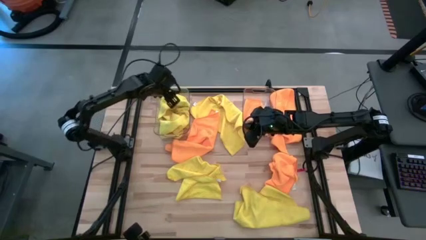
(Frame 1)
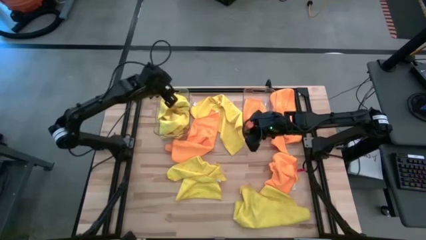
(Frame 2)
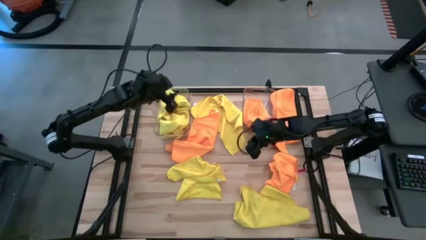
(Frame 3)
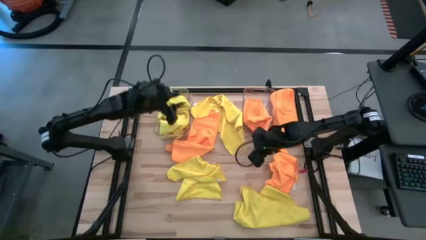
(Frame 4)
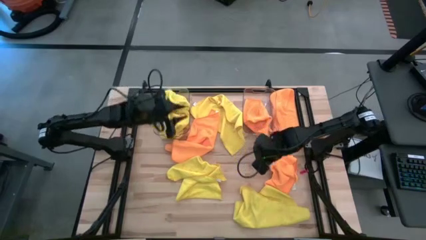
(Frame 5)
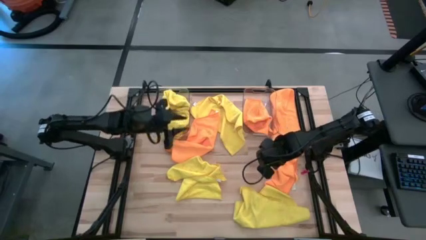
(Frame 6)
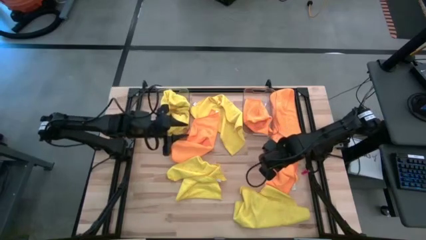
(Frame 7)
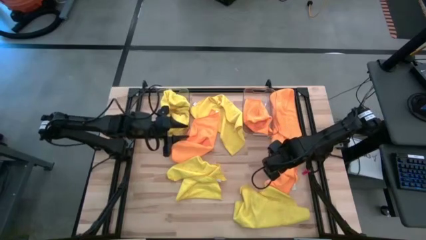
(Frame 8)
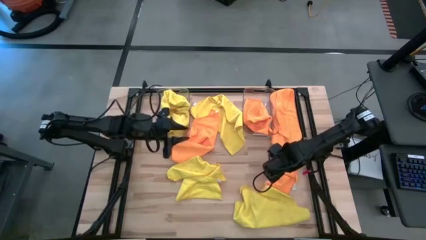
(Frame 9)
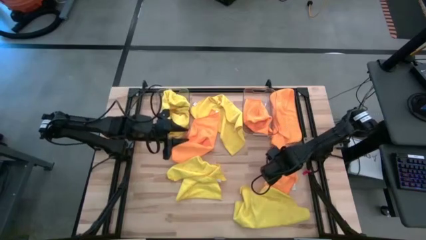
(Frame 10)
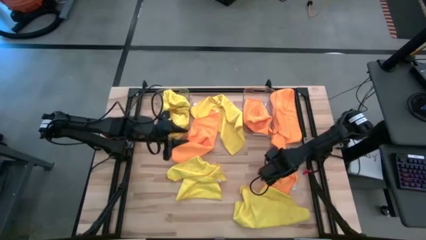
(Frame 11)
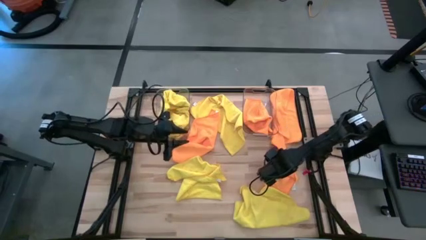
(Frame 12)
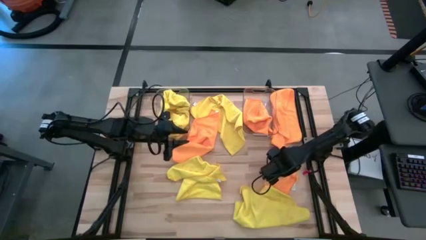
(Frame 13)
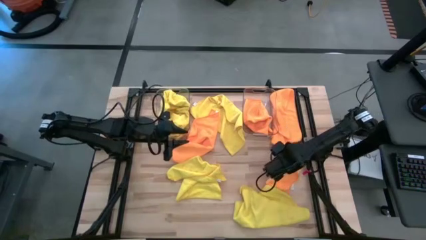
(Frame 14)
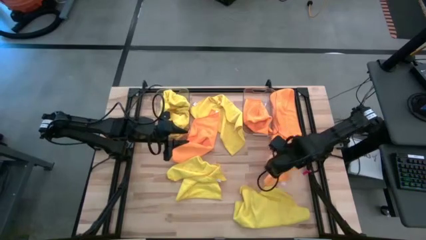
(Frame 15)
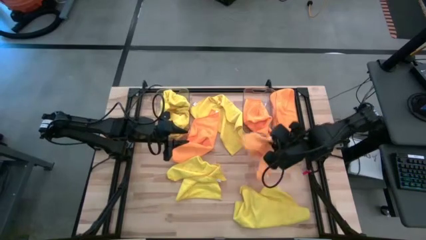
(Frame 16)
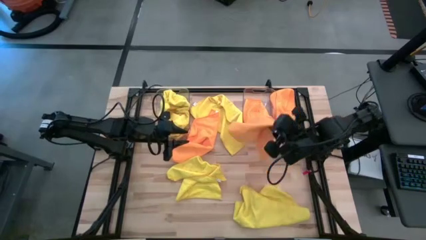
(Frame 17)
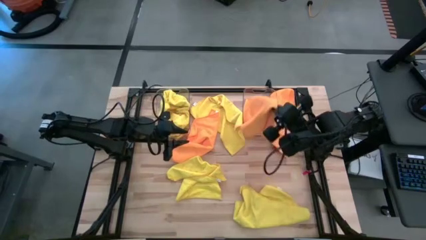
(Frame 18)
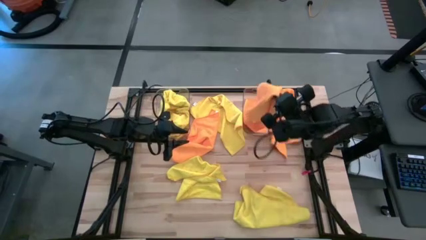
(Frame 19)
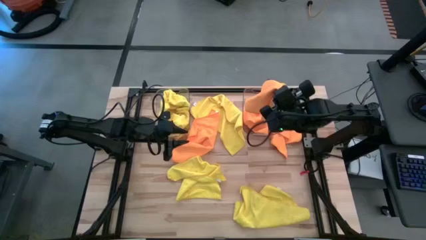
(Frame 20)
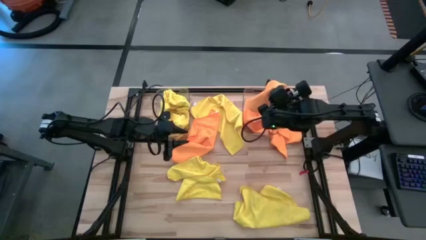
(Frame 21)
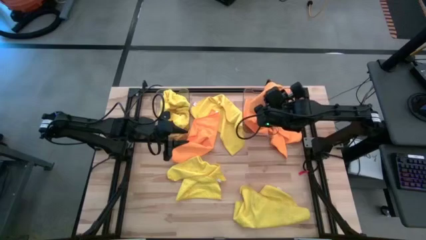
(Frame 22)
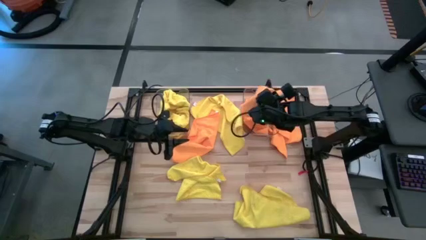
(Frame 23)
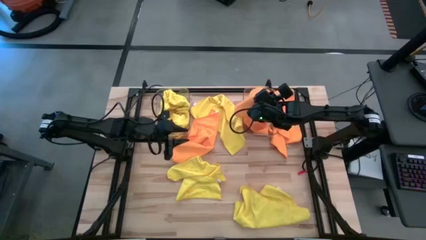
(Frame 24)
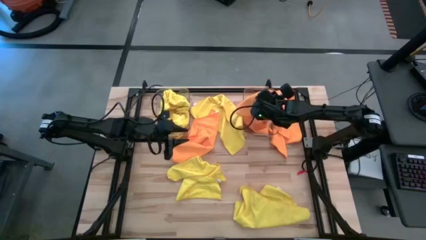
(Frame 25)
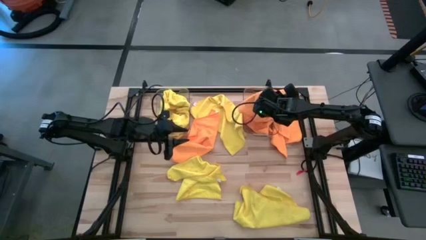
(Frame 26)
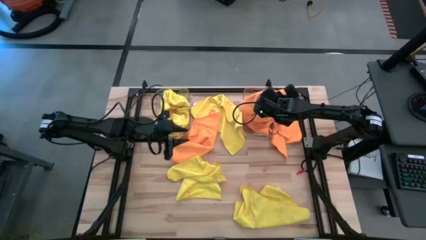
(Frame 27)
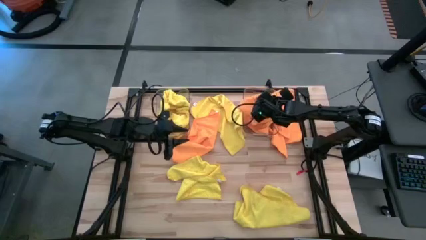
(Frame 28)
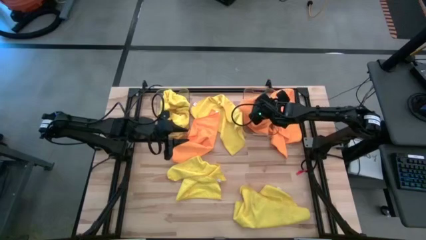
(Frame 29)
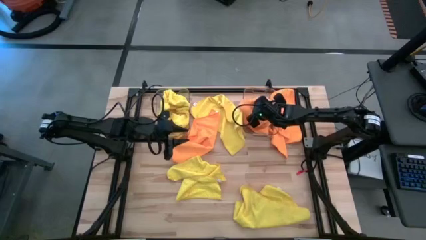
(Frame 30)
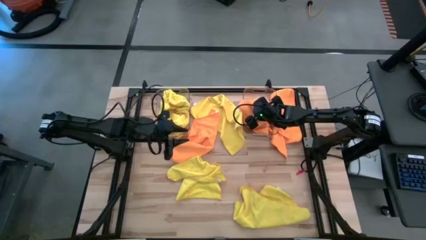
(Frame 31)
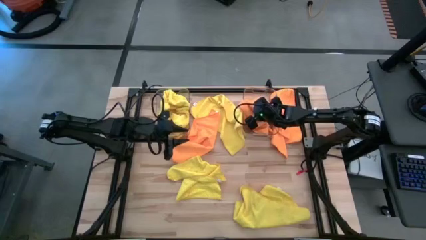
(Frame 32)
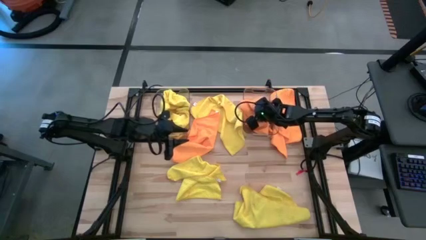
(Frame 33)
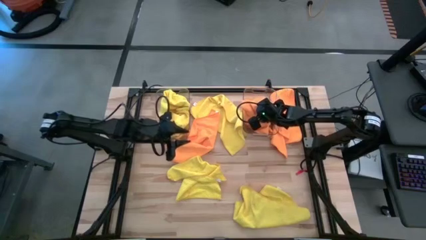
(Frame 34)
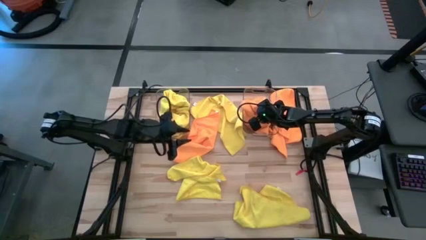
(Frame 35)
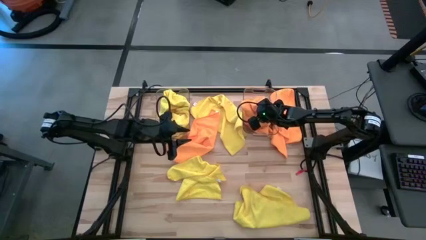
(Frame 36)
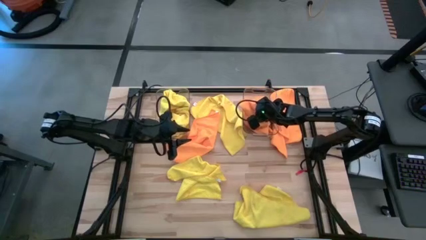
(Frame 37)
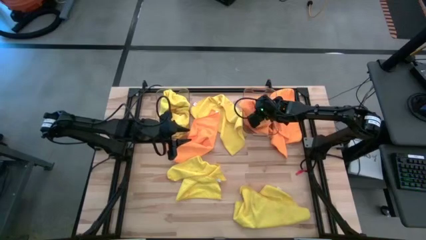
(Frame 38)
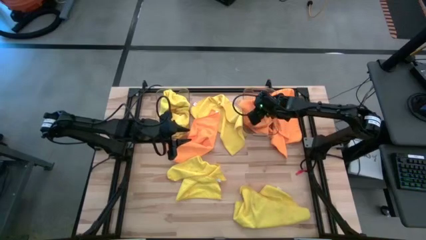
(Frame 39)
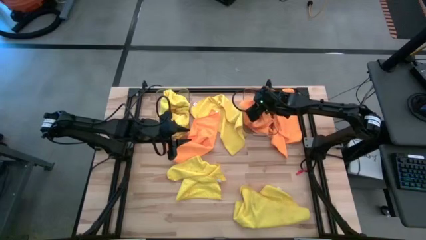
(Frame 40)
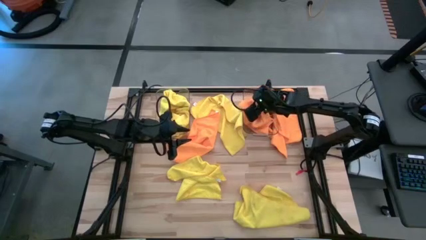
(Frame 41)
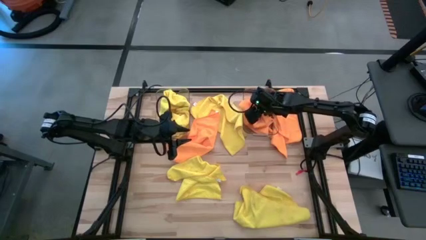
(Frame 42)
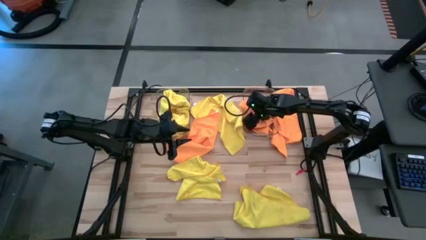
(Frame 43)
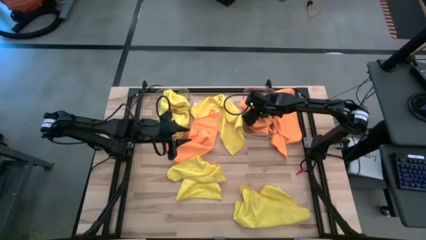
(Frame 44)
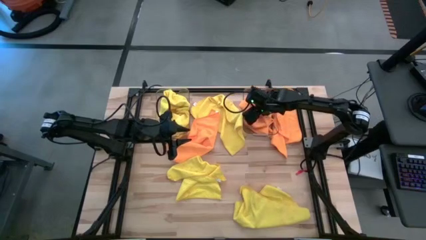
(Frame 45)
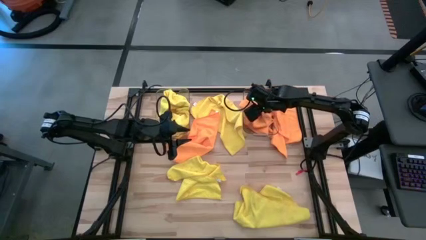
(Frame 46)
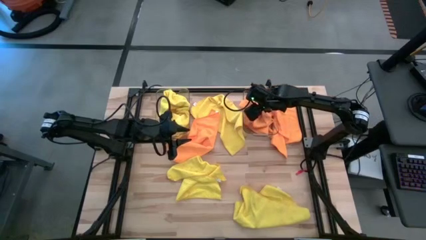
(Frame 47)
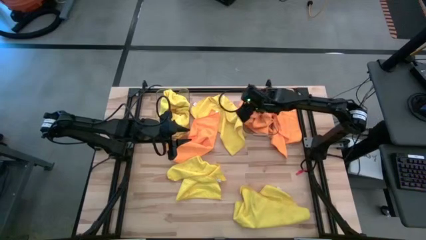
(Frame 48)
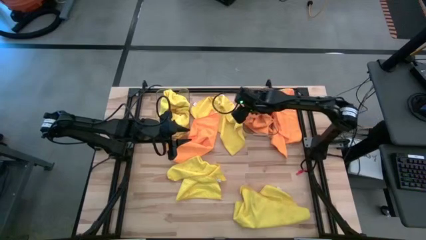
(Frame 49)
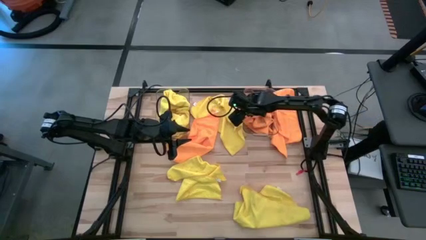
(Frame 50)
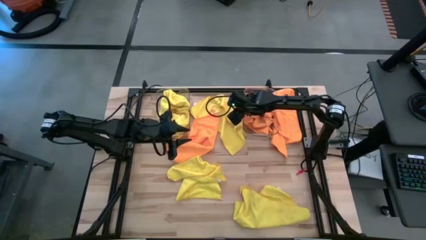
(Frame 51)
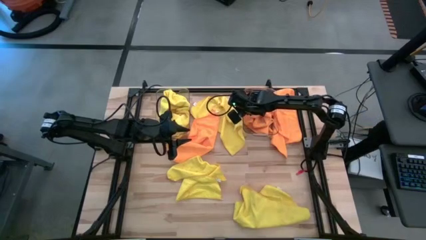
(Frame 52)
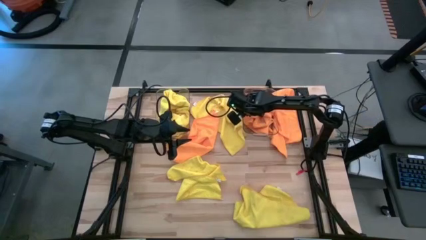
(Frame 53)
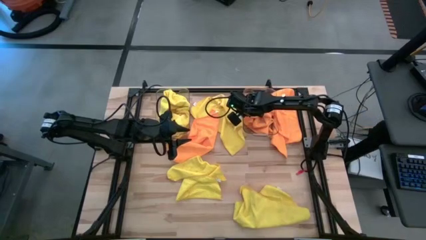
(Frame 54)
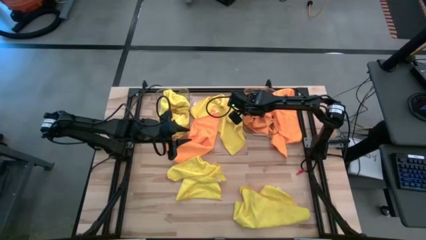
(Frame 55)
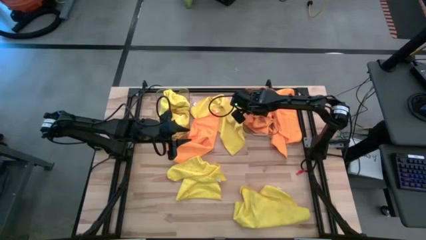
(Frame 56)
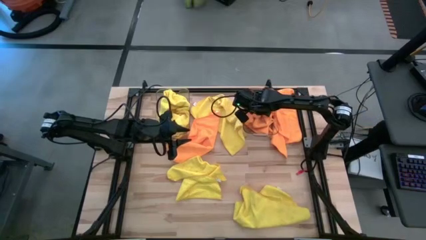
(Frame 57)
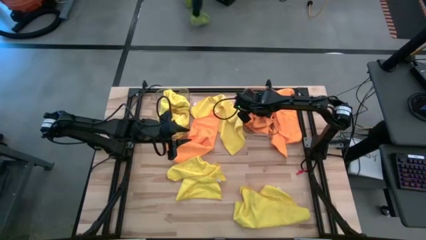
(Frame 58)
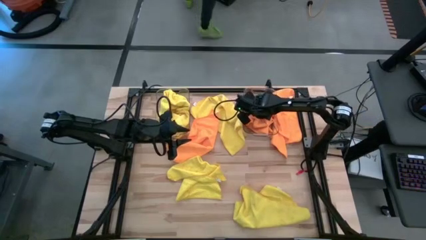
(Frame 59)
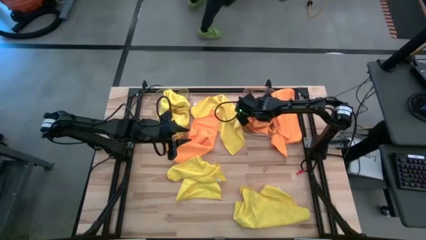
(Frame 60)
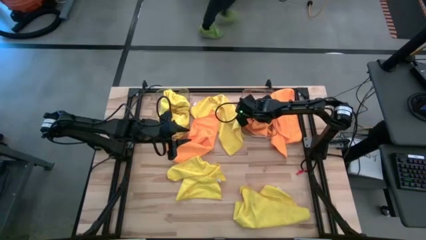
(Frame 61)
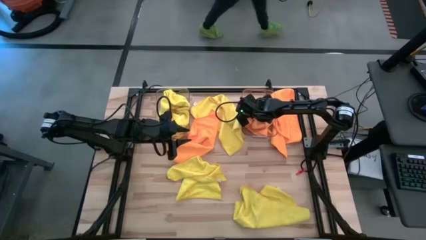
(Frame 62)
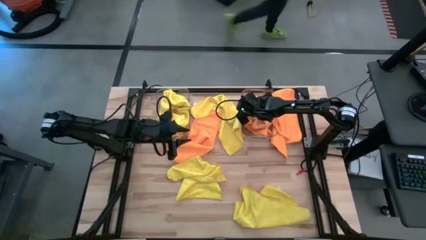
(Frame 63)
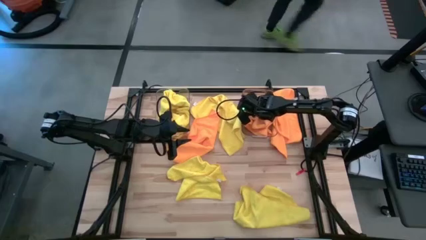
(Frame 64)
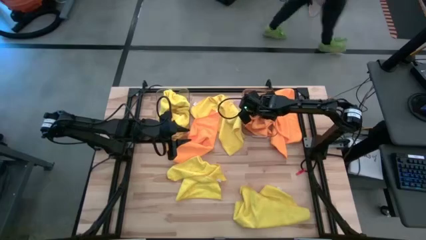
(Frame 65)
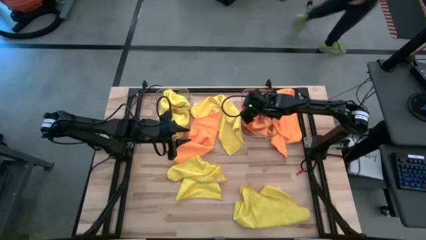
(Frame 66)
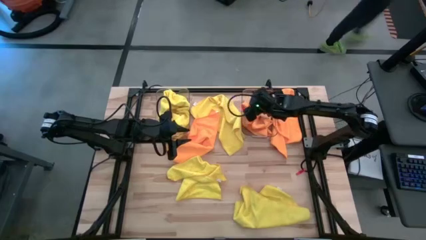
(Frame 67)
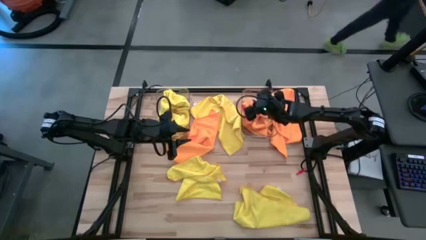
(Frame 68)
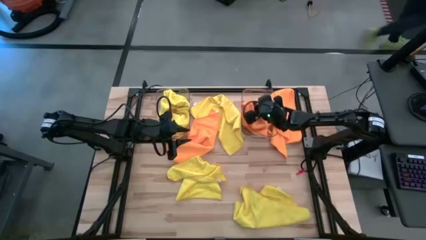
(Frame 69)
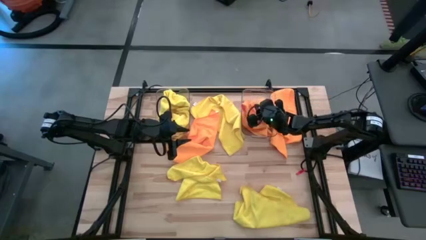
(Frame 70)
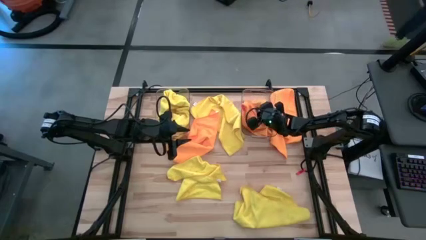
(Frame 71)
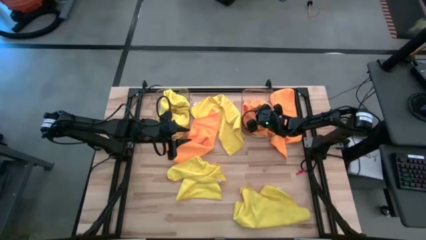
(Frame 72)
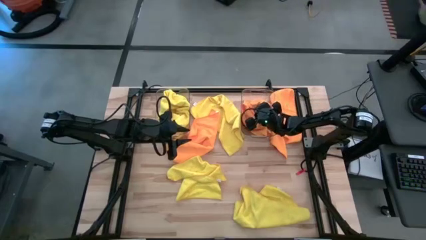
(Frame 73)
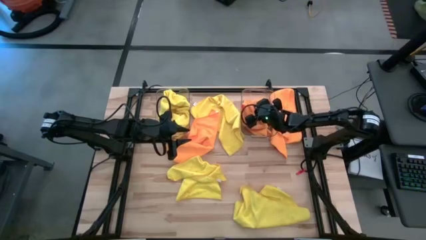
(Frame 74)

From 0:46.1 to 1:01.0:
Task: Sort microfiber towel by color & place in baskets
Put the orange microfiber cloth into the right transparent bin

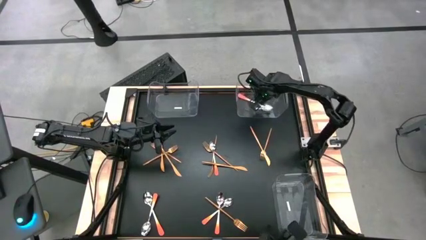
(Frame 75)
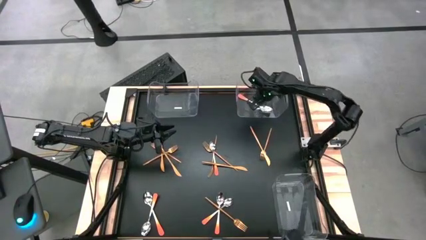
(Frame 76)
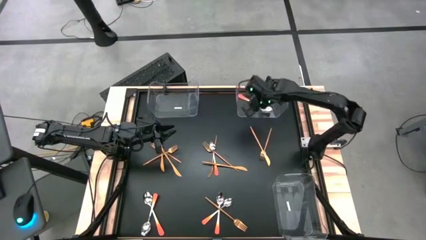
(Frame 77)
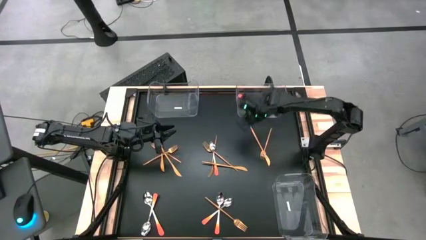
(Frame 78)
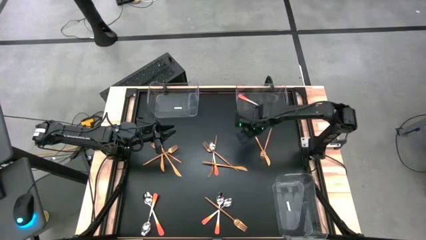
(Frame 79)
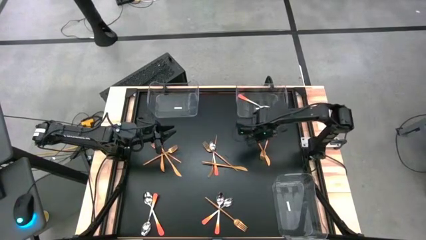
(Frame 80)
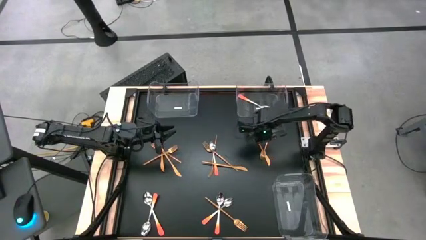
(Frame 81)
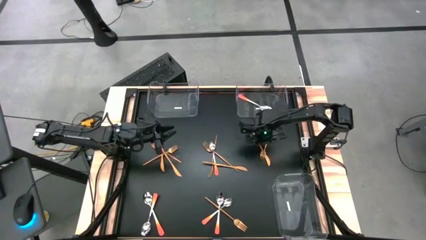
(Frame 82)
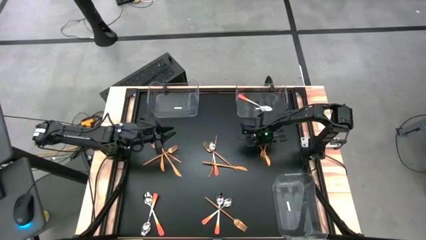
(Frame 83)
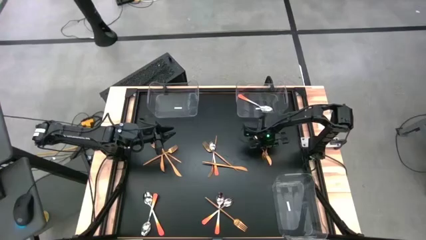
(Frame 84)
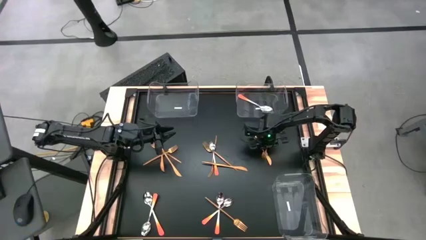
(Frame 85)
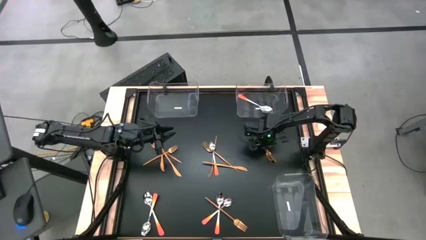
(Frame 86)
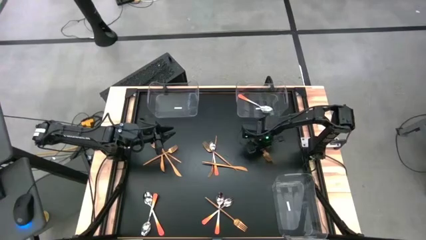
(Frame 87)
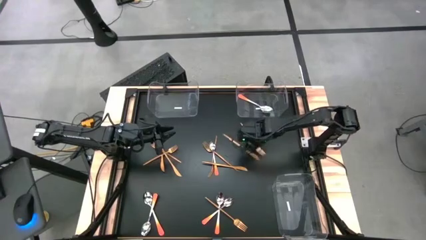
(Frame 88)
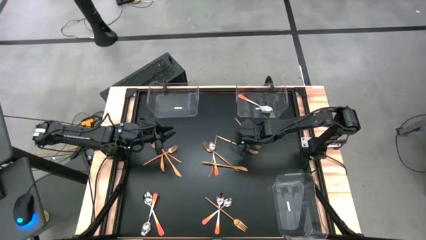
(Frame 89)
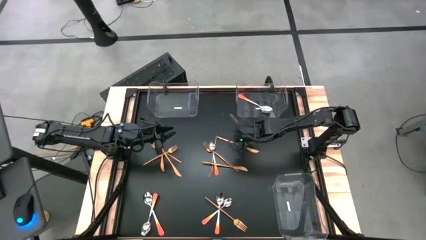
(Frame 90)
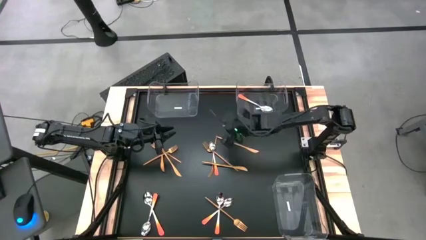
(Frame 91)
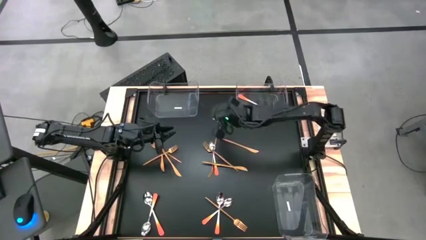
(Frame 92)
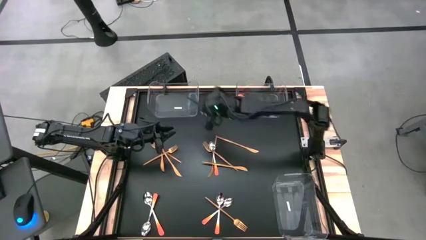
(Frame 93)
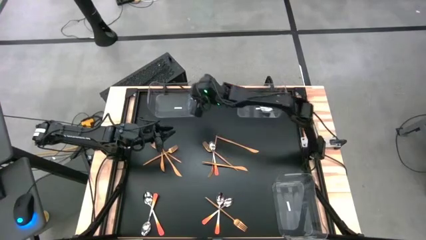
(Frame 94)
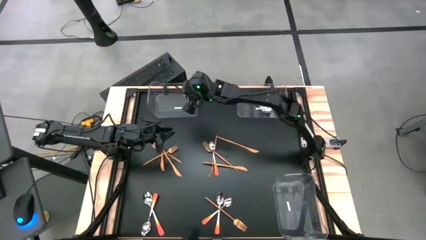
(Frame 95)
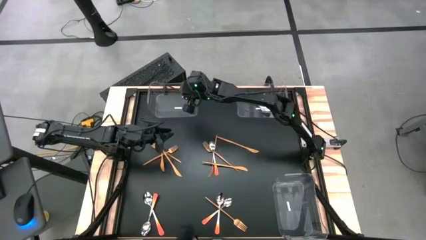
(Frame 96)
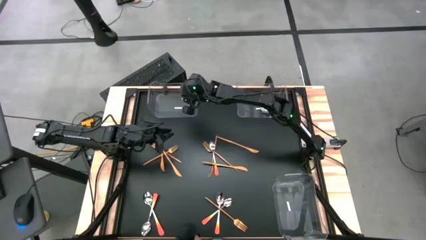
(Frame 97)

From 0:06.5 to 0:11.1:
Task: Sort silverware by color (type)
Put the gold fork into the top left transparent bin
